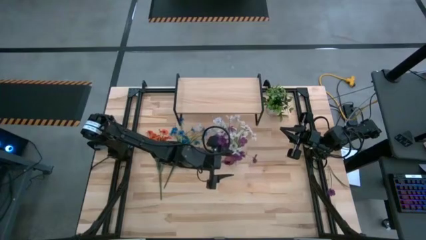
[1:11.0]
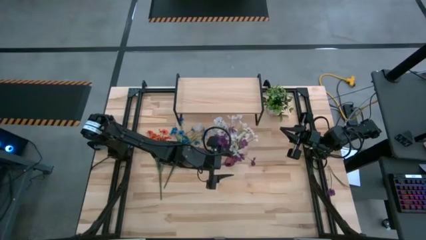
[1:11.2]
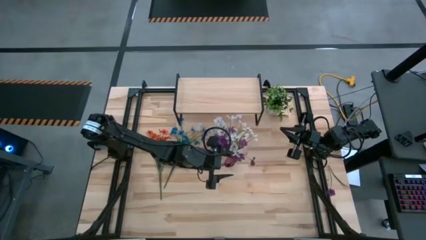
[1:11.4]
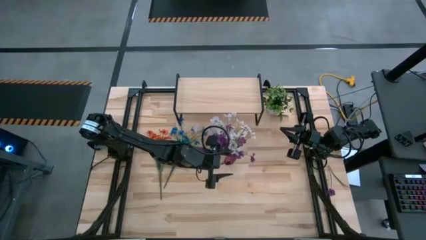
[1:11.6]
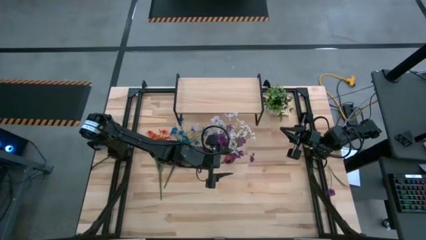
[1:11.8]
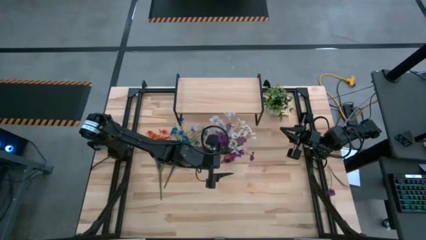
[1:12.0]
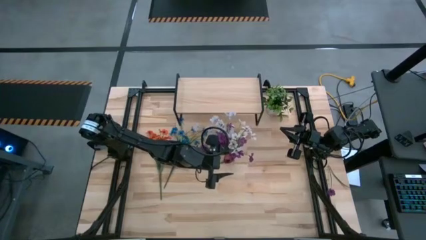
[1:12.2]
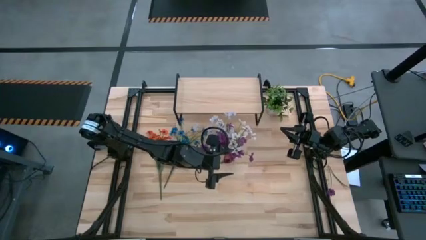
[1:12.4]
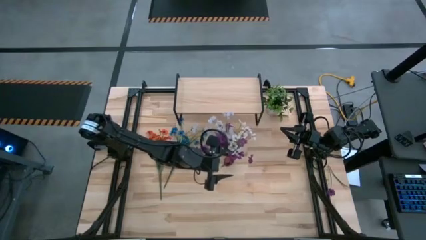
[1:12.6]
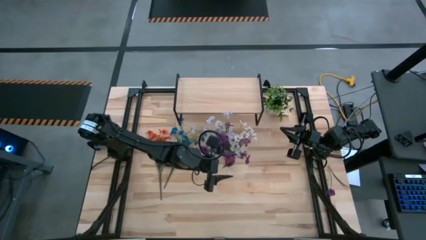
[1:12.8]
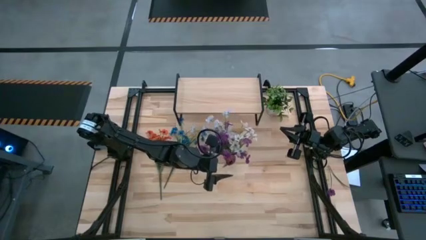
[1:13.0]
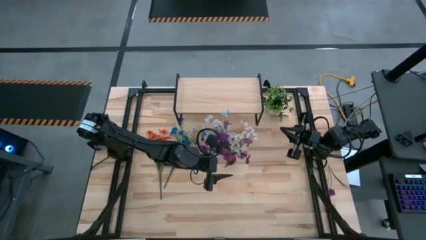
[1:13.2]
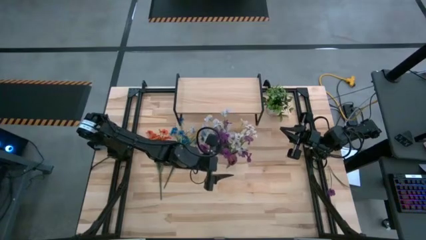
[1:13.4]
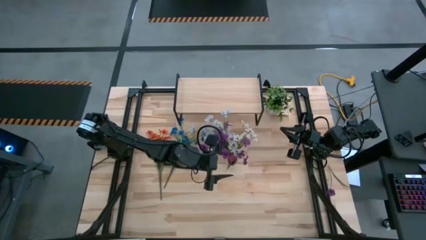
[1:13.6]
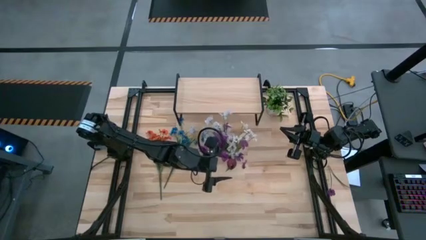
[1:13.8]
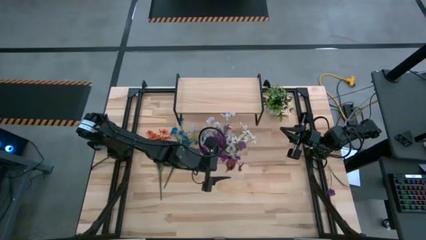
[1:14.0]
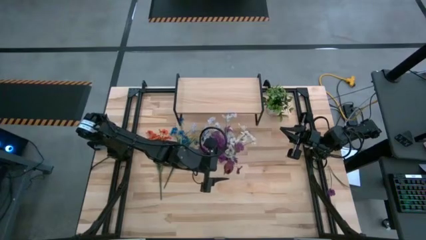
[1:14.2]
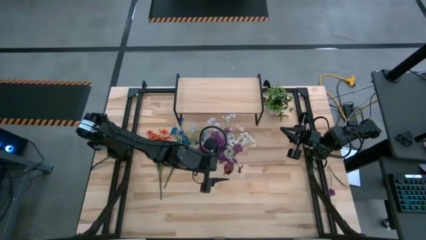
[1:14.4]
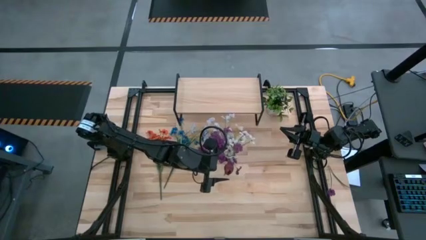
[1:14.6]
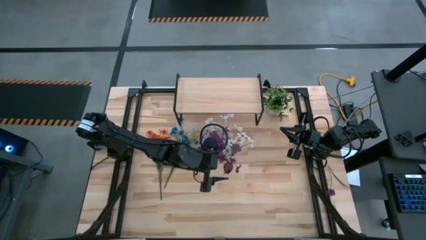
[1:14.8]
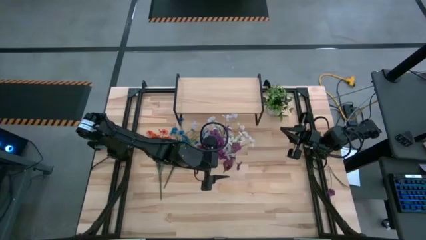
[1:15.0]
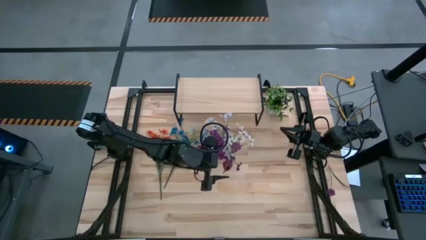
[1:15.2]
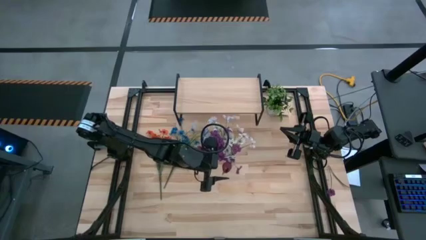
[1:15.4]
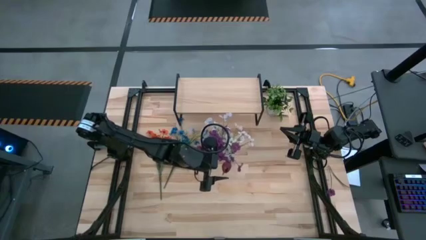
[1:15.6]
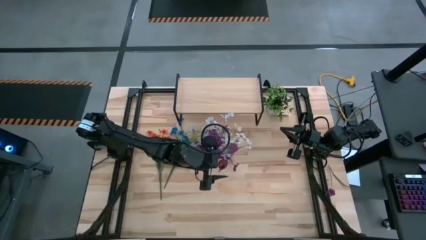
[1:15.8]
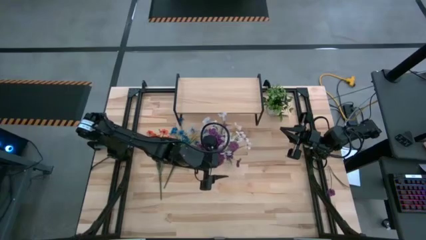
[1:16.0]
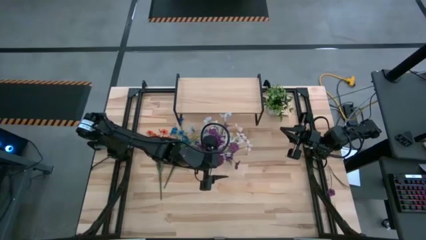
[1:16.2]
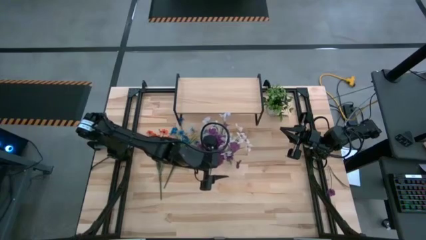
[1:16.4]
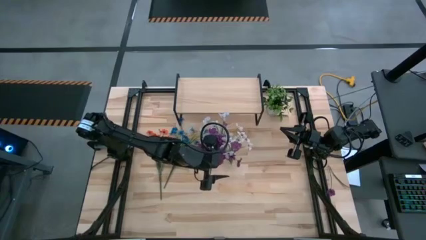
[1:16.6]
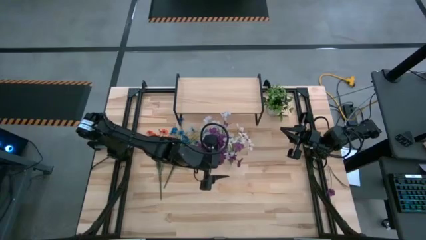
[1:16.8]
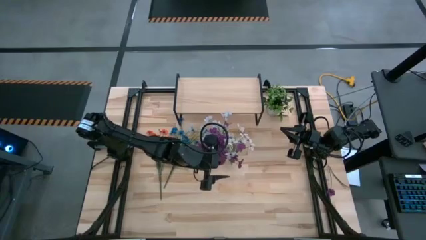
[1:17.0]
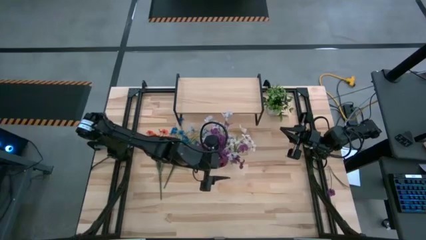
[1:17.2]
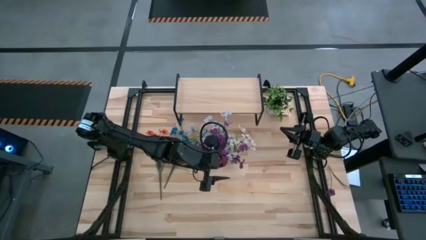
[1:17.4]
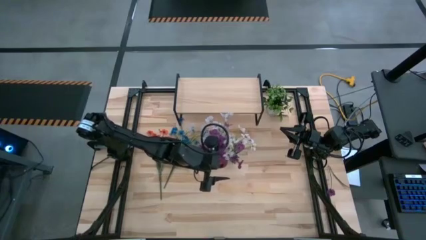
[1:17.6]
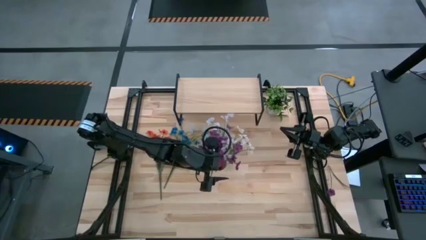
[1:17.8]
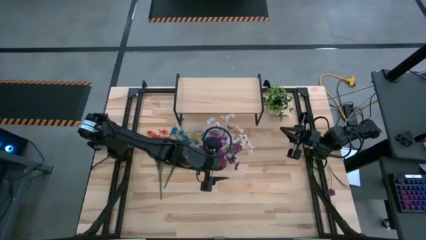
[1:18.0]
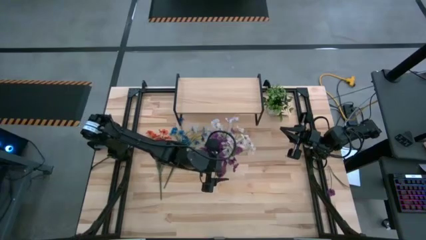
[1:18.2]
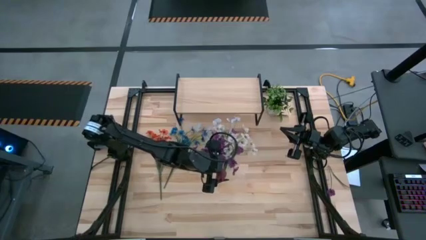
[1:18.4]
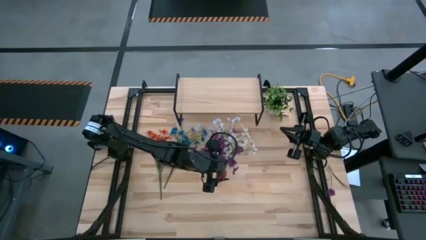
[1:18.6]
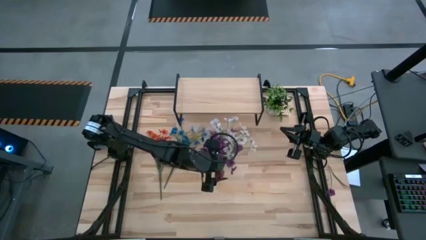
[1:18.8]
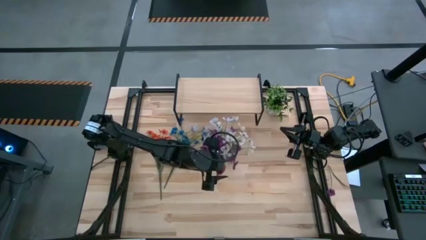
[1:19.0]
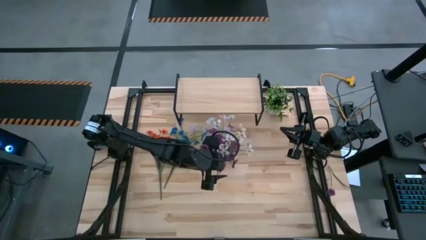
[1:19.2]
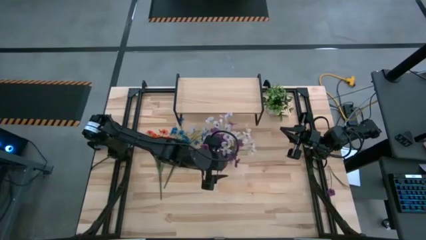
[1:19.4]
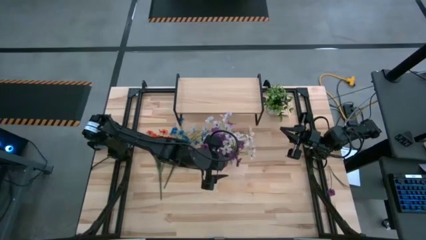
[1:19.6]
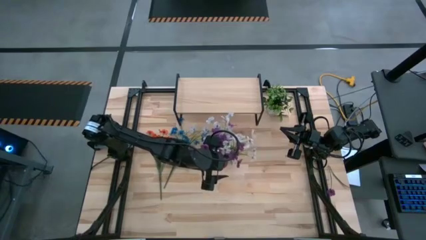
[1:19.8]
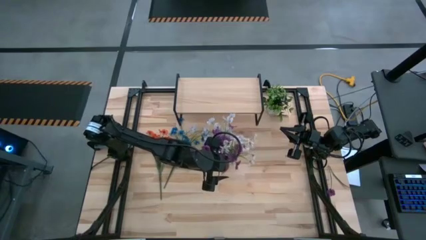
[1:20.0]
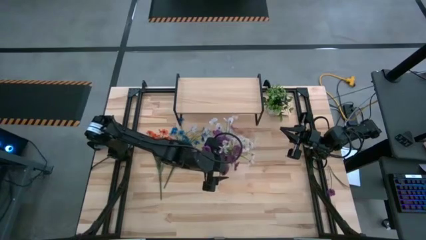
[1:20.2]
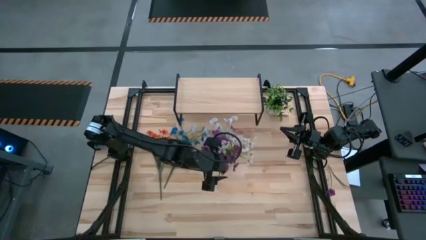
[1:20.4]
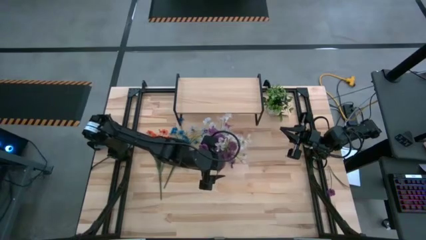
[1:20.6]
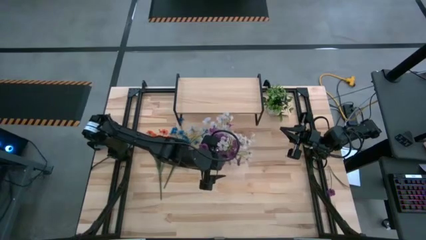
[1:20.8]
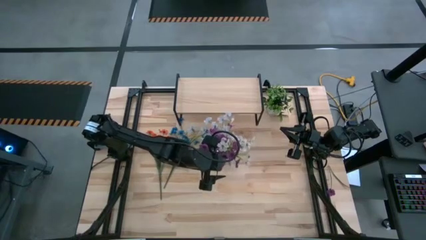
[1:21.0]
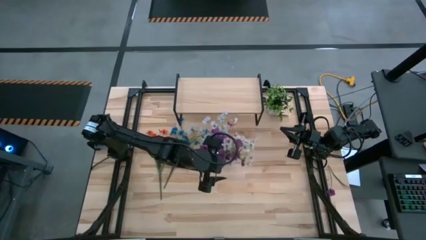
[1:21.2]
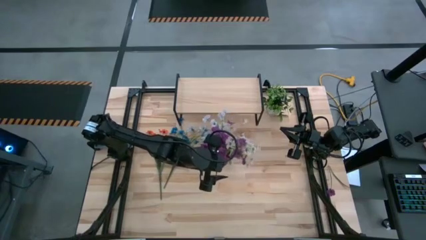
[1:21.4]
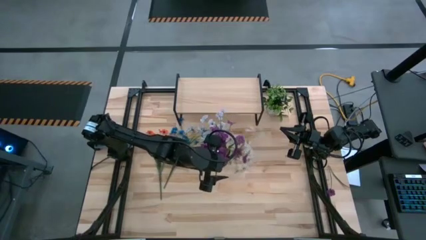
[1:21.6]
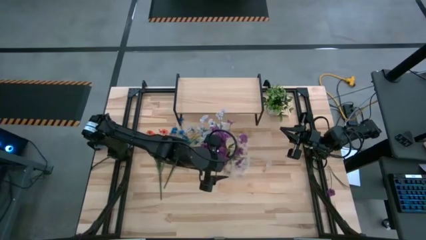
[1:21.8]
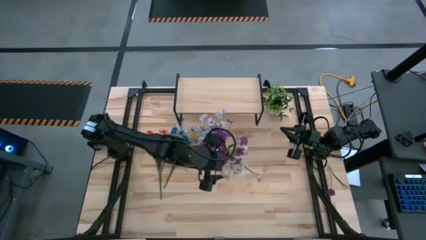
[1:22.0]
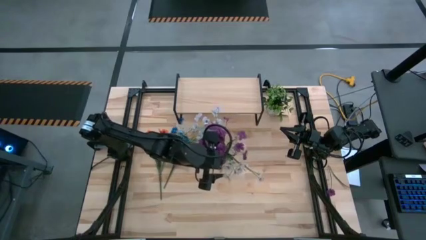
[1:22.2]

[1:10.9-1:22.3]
Task: Pick and place flowers into a vace then onto a shelf
Put the red flower into the transparent vase

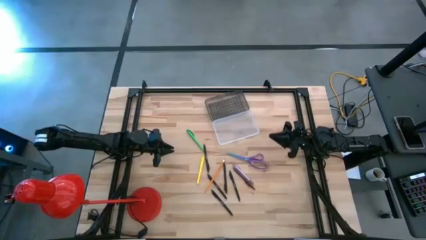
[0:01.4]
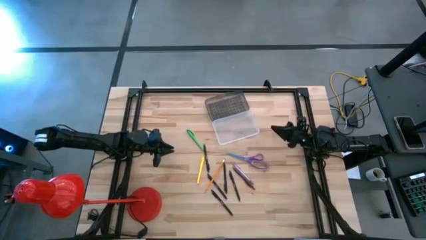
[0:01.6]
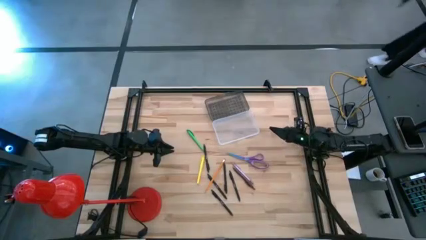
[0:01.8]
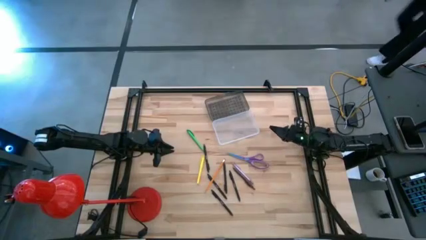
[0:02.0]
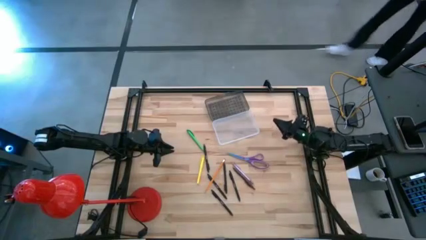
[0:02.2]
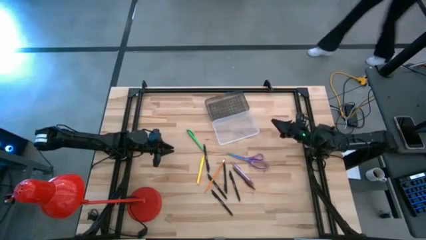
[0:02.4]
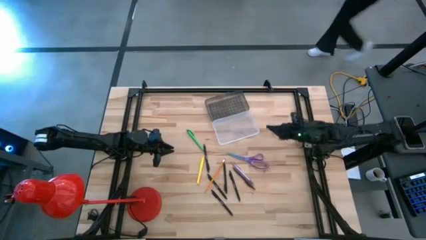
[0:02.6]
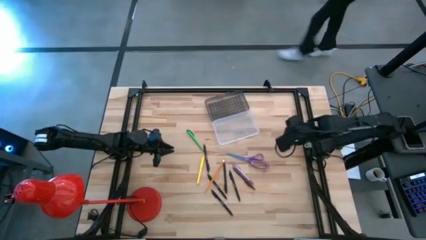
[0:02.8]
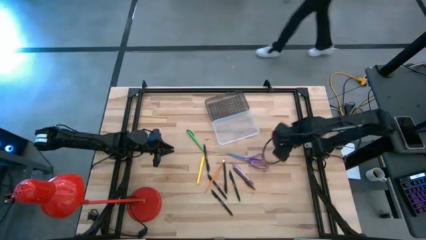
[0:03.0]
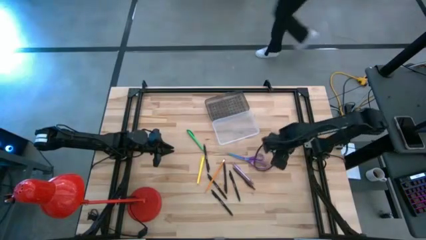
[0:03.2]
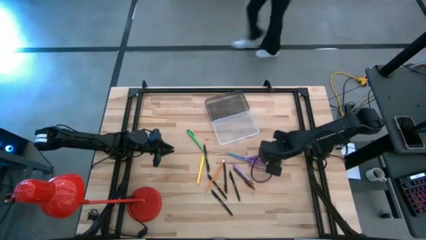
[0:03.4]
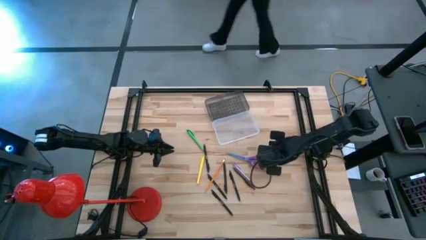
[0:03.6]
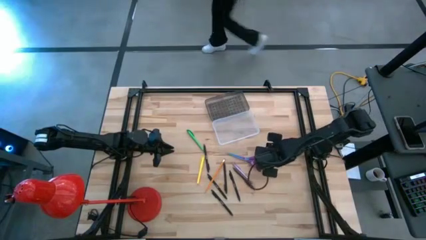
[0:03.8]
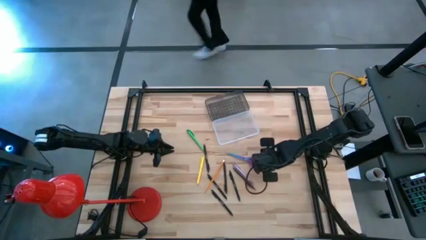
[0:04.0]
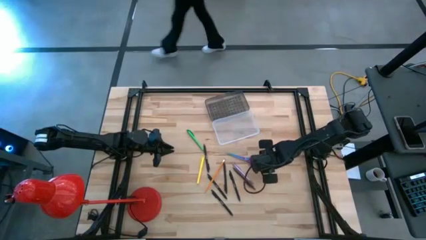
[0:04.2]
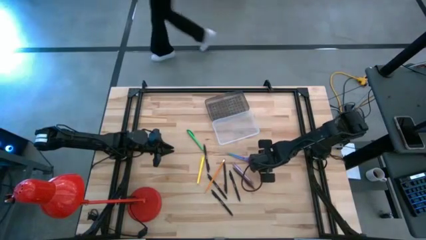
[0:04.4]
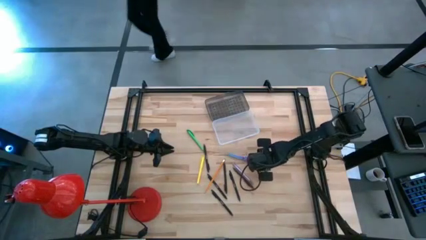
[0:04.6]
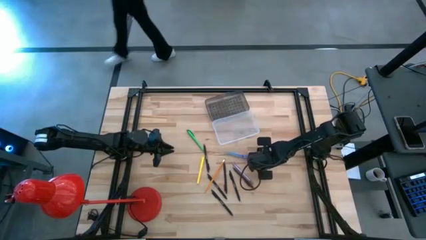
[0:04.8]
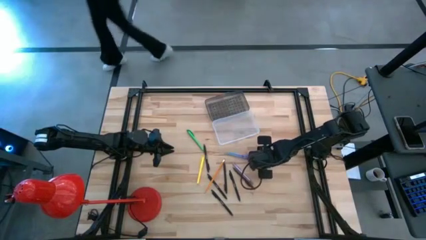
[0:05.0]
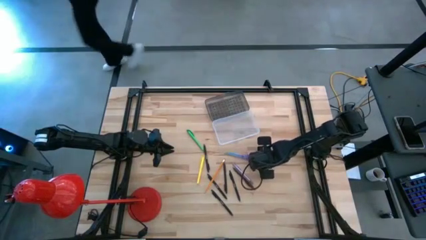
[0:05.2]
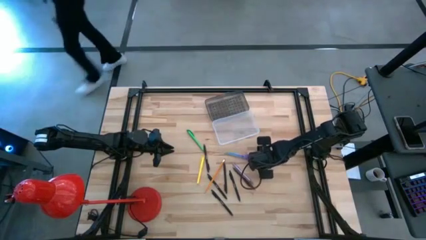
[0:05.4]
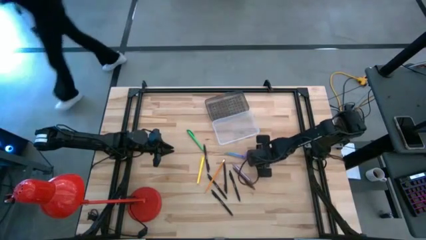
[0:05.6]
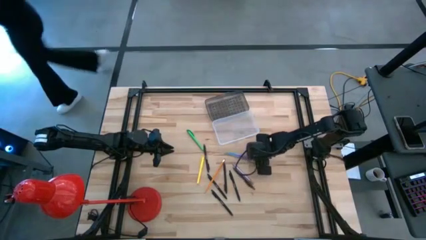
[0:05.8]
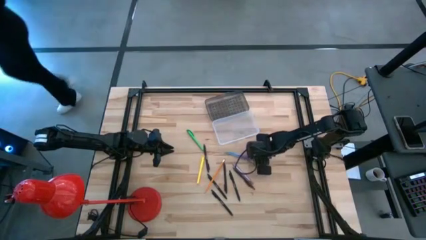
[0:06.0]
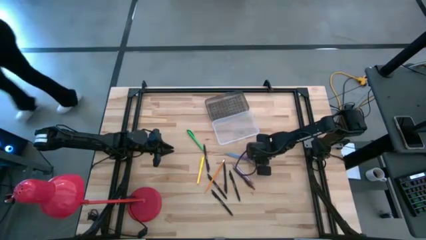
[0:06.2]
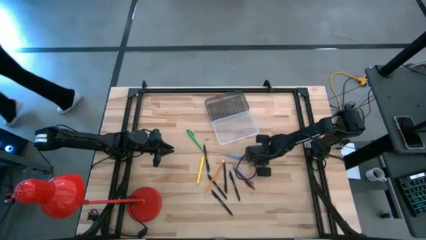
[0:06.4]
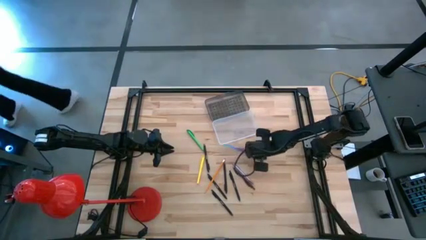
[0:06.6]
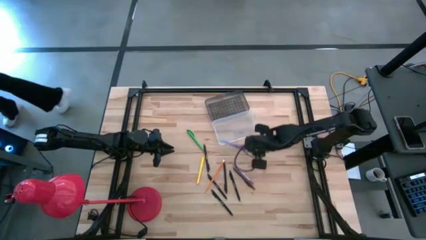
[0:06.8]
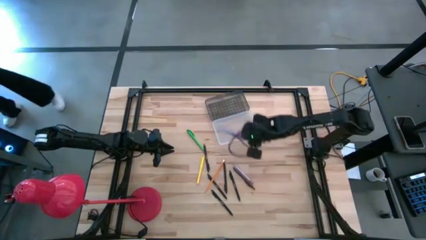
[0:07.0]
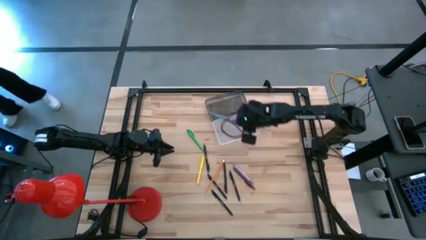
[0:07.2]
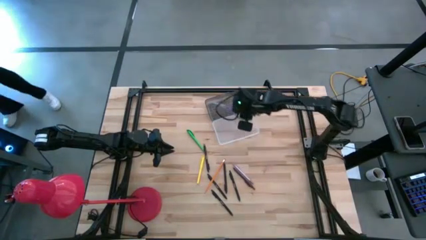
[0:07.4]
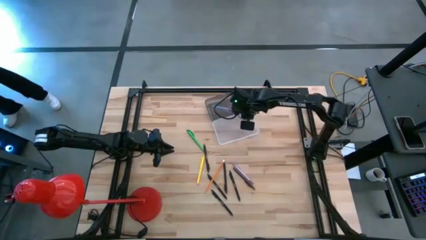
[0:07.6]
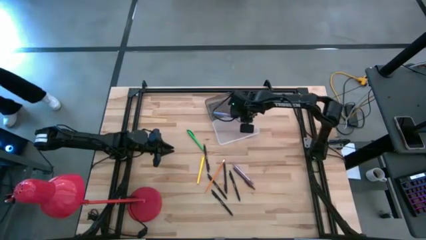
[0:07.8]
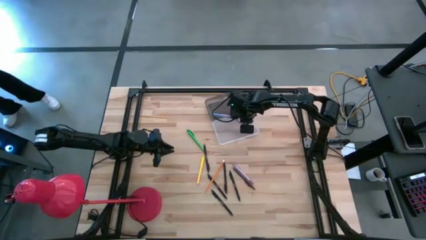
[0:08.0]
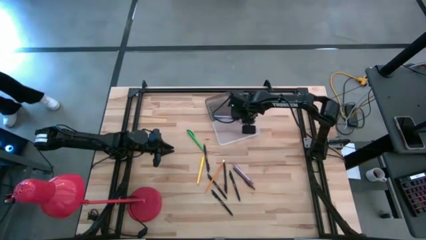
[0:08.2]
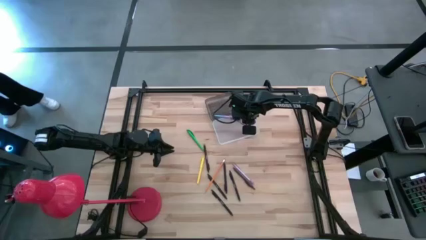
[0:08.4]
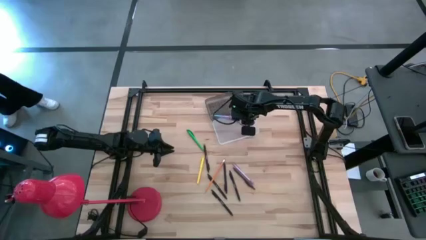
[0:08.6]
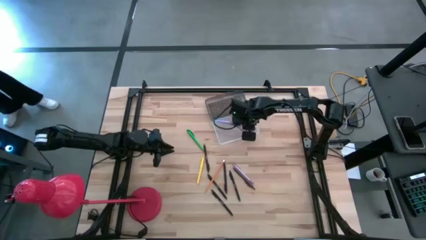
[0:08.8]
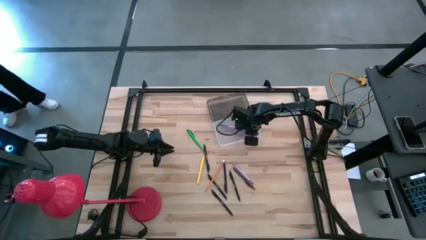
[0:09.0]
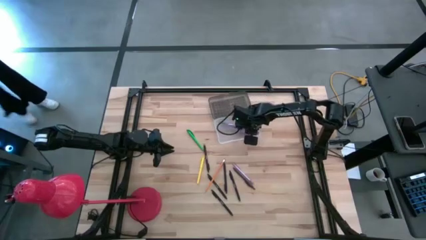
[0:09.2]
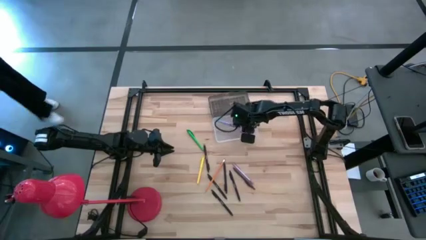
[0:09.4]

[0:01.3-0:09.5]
Task: Pick & place school supplies into a supply box
Put the purple scissors into the gray supply box
